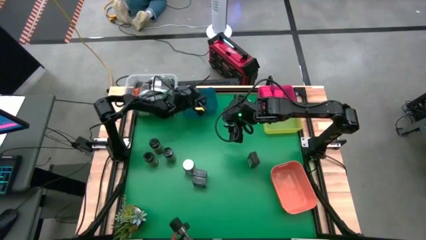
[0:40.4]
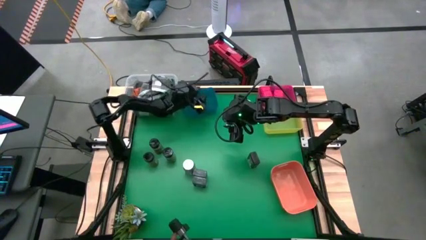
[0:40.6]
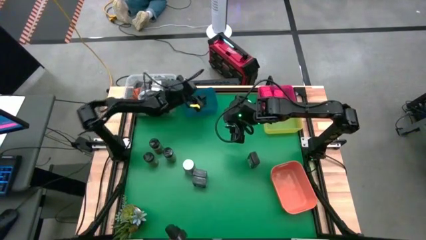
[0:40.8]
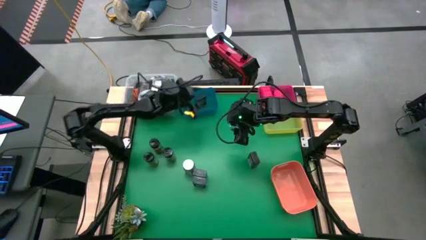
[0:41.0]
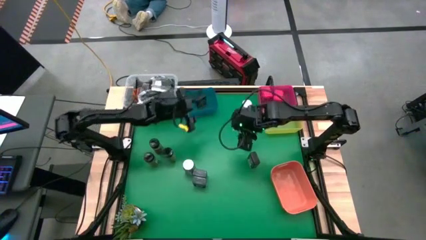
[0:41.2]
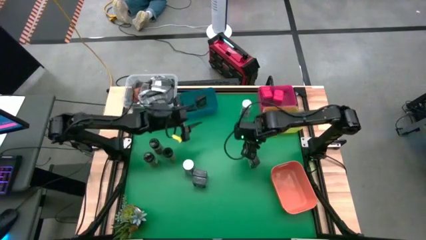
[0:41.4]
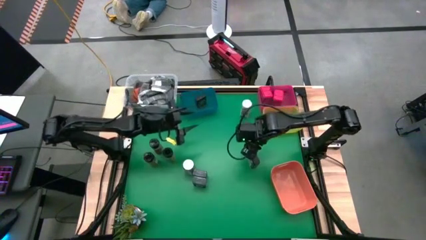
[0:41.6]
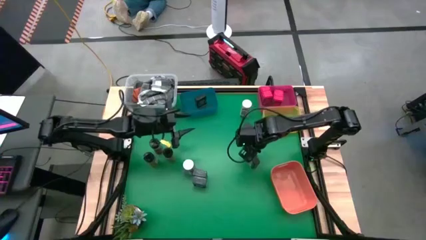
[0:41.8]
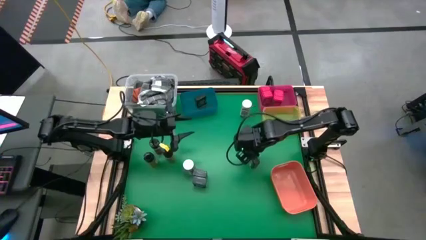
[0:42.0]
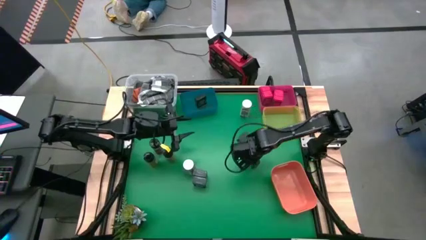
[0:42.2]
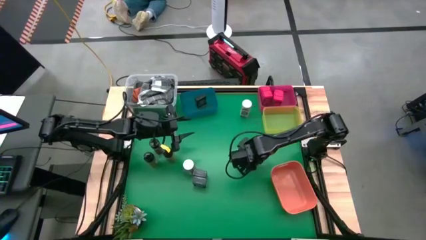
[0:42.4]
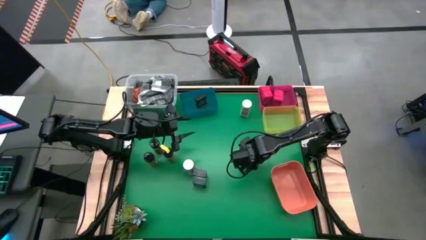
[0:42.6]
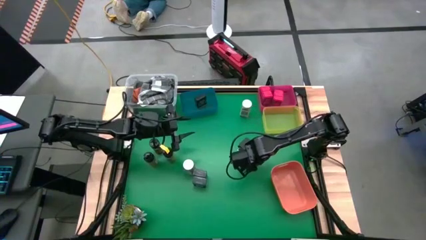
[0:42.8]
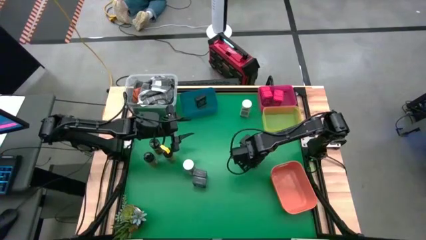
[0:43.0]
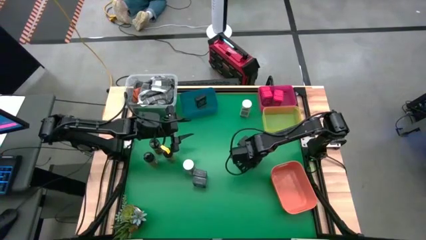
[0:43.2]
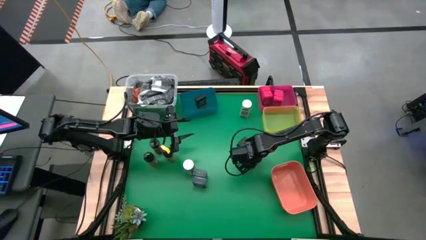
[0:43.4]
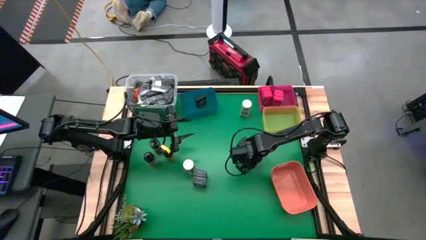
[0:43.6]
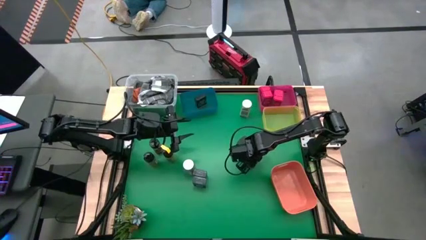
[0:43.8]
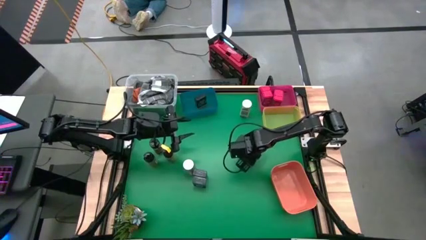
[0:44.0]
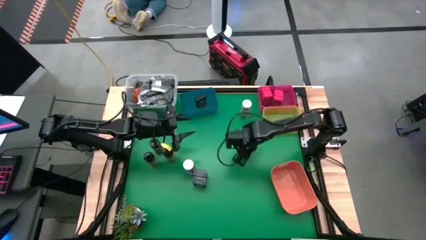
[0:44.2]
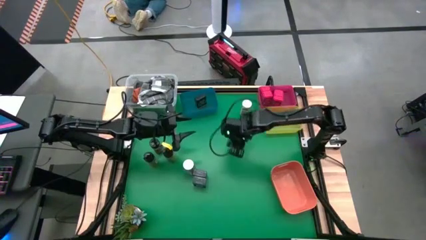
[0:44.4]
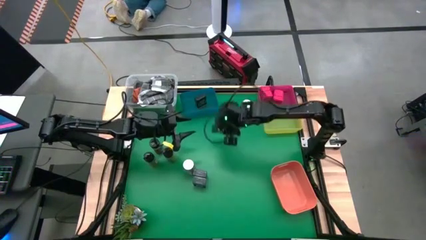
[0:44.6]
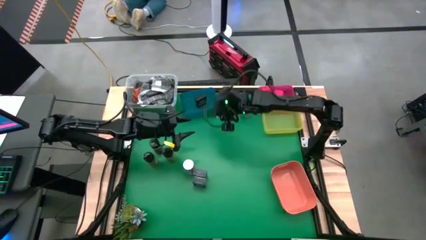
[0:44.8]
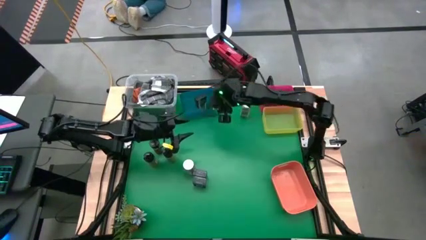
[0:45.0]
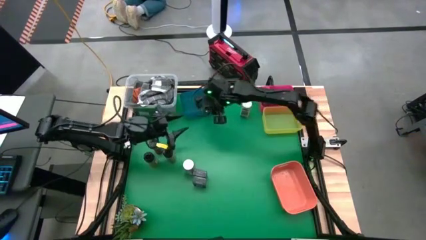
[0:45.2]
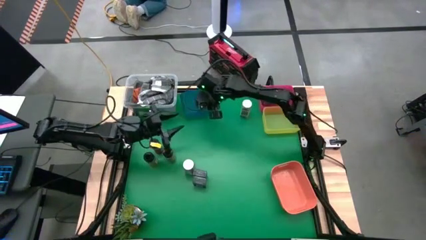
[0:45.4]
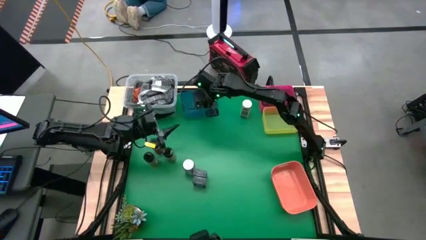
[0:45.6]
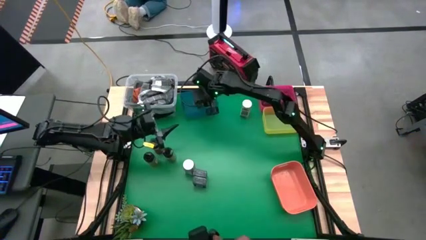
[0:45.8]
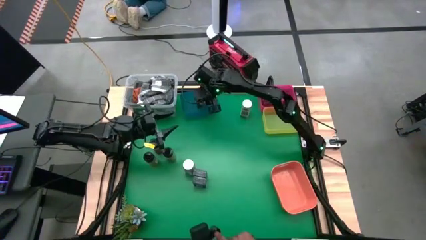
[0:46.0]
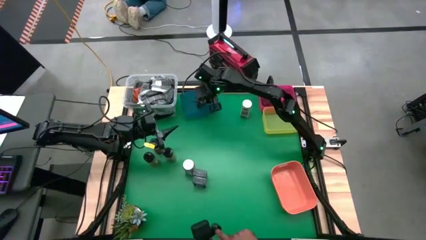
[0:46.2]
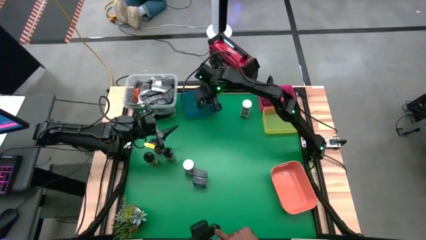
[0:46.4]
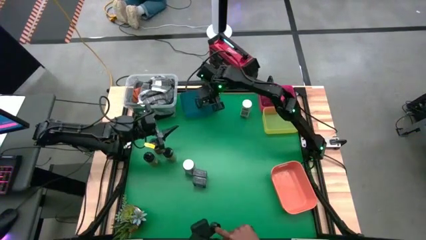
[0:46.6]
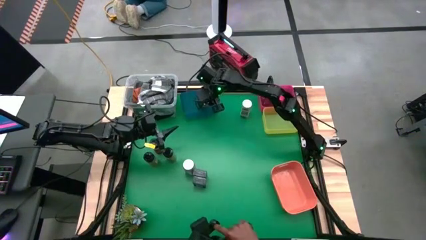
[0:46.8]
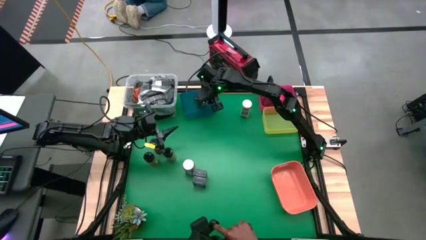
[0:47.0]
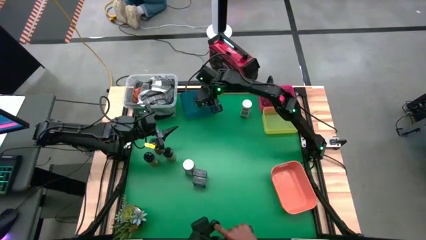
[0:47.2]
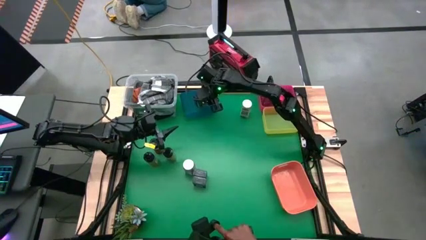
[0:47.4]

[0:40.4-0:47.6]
Task: Sort spices by type
Put the black seasoning from the middle into the blue bin

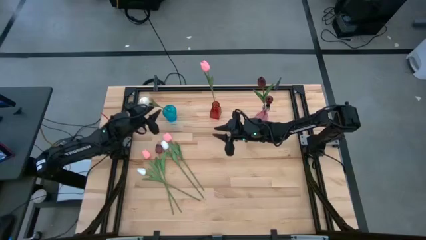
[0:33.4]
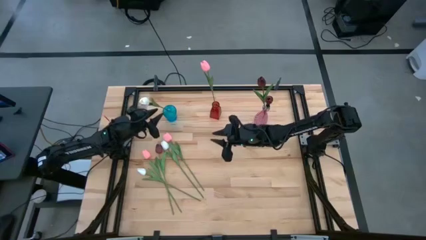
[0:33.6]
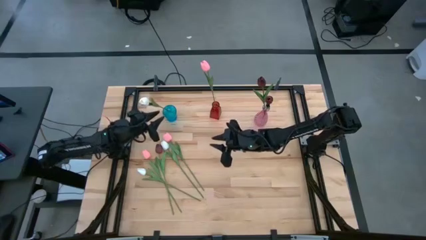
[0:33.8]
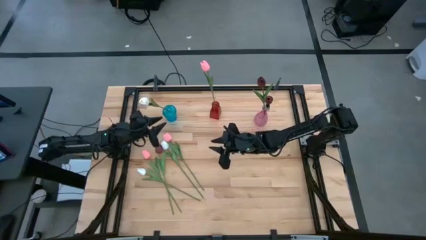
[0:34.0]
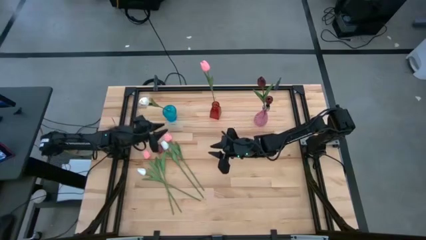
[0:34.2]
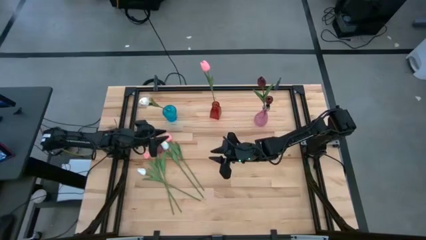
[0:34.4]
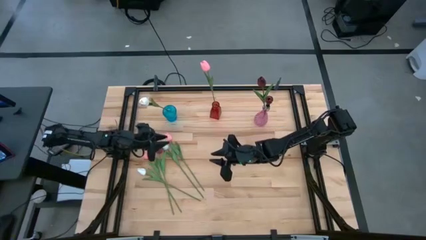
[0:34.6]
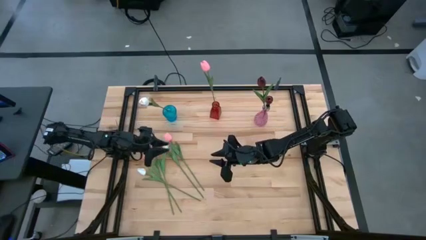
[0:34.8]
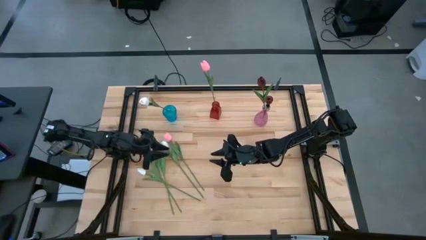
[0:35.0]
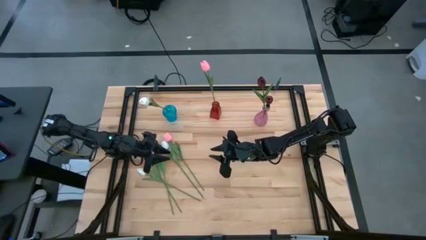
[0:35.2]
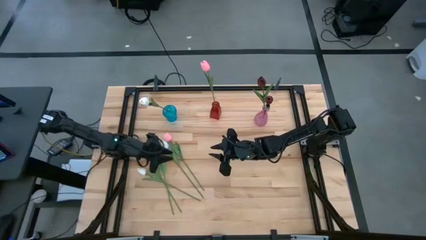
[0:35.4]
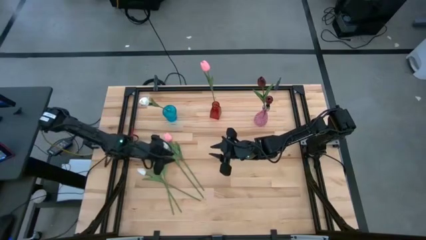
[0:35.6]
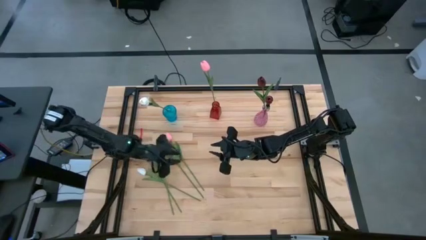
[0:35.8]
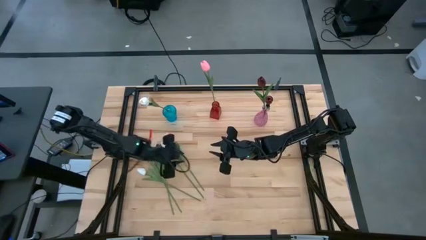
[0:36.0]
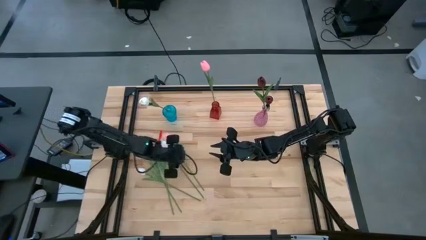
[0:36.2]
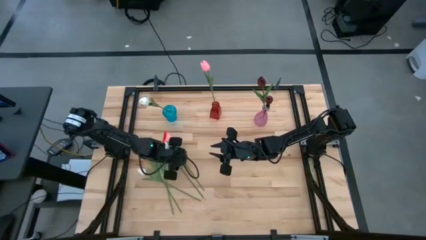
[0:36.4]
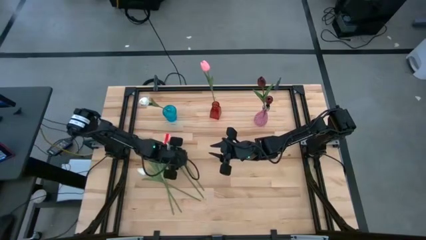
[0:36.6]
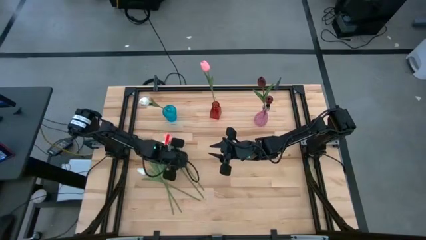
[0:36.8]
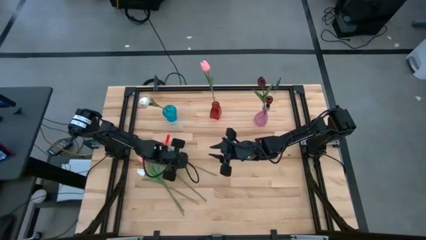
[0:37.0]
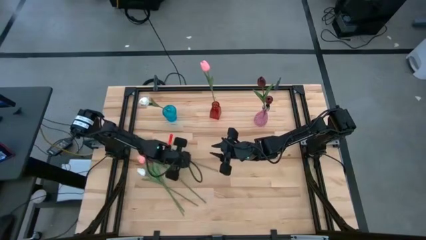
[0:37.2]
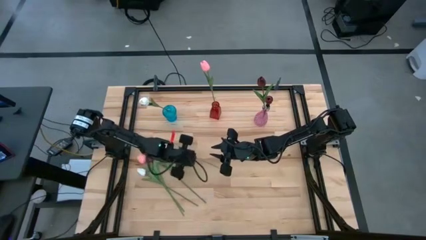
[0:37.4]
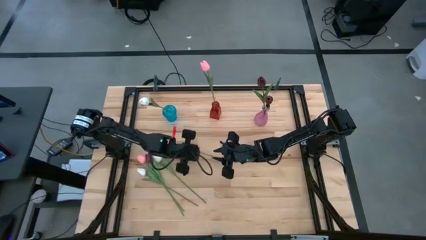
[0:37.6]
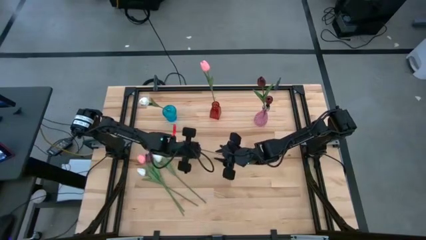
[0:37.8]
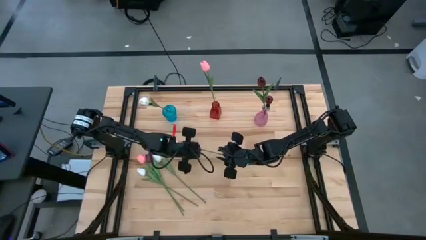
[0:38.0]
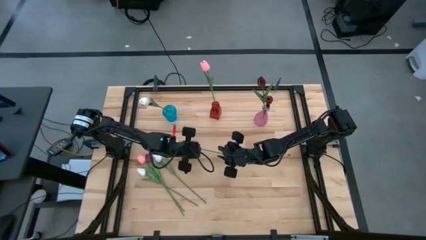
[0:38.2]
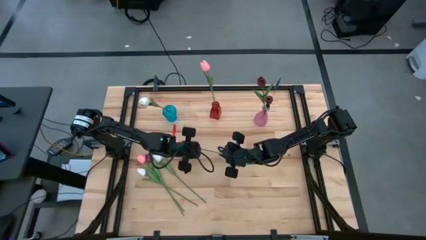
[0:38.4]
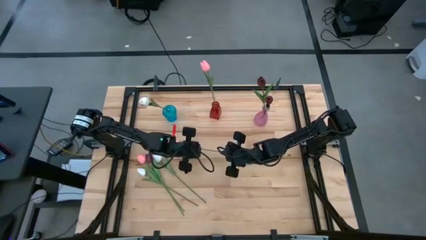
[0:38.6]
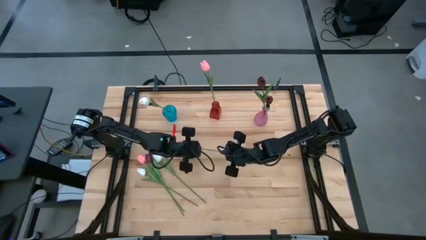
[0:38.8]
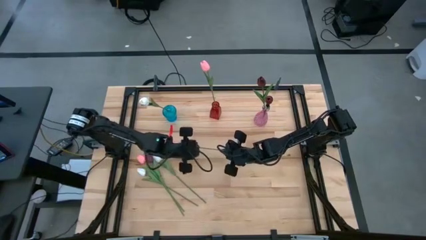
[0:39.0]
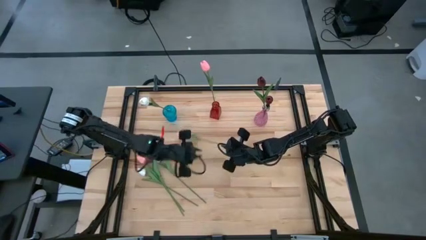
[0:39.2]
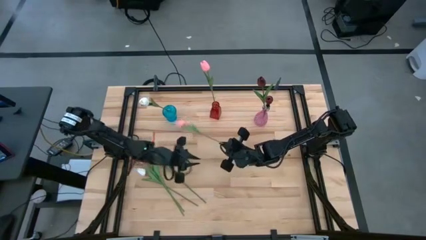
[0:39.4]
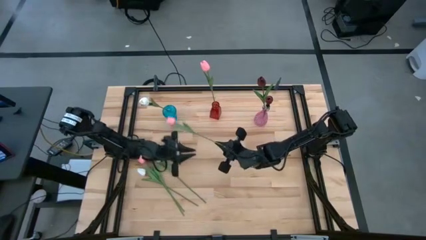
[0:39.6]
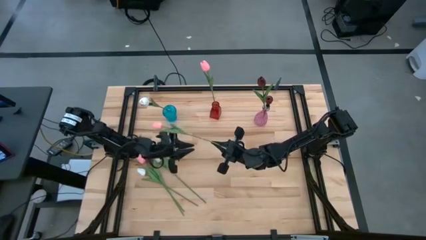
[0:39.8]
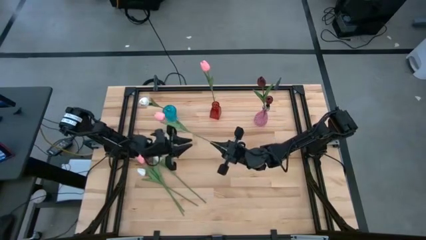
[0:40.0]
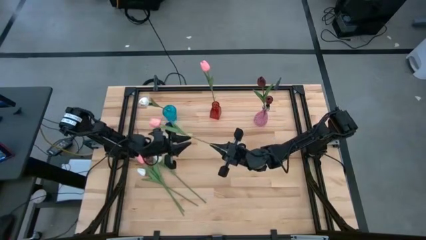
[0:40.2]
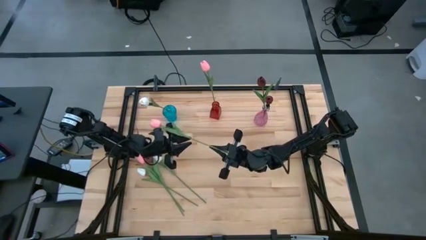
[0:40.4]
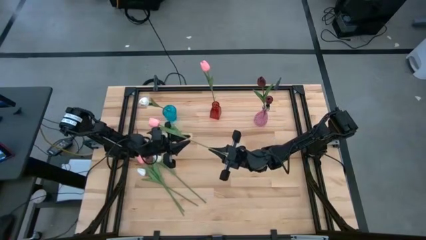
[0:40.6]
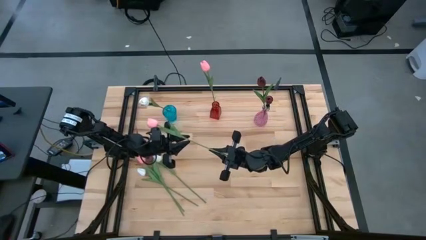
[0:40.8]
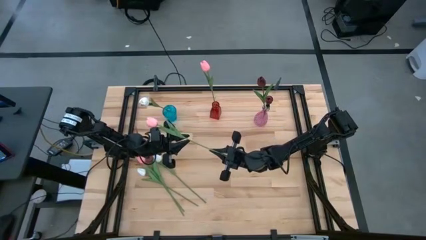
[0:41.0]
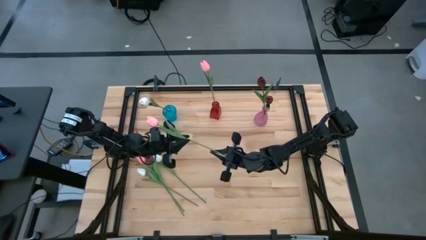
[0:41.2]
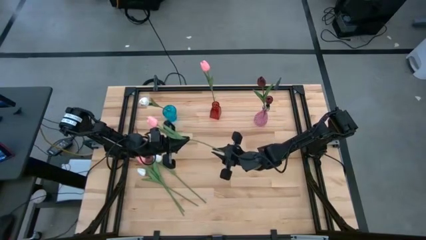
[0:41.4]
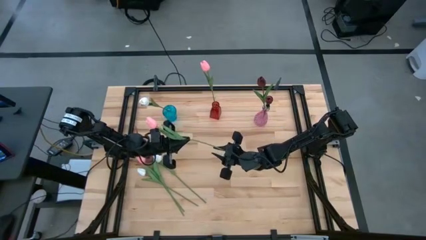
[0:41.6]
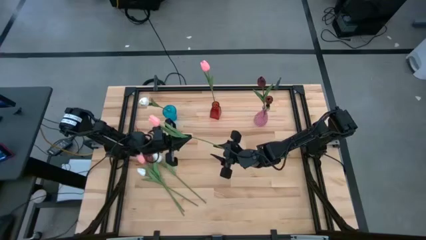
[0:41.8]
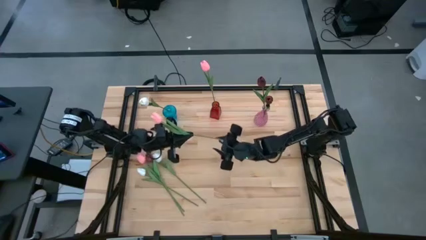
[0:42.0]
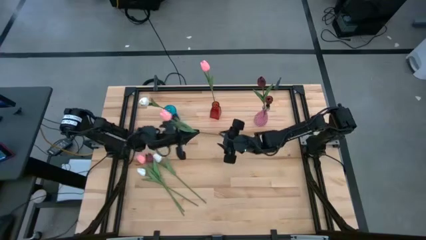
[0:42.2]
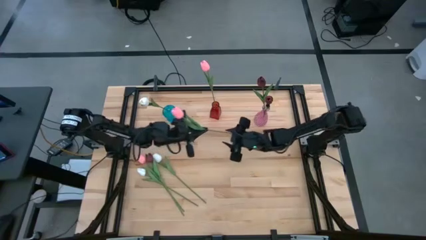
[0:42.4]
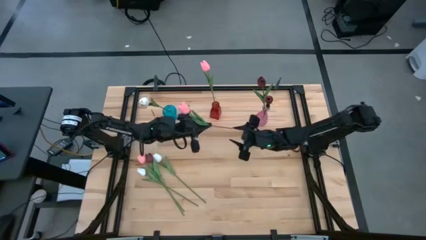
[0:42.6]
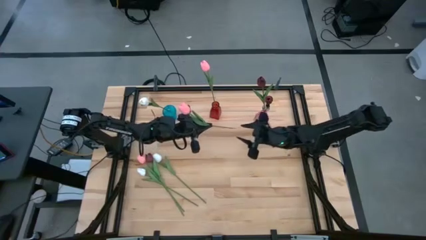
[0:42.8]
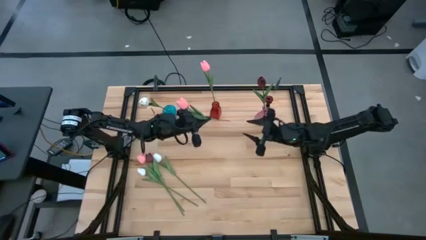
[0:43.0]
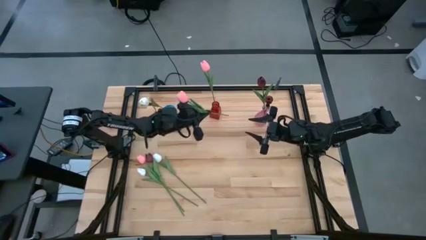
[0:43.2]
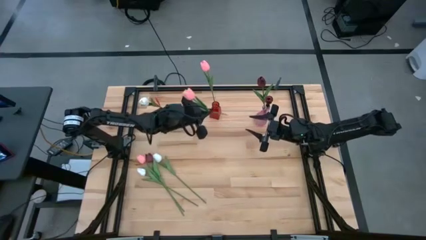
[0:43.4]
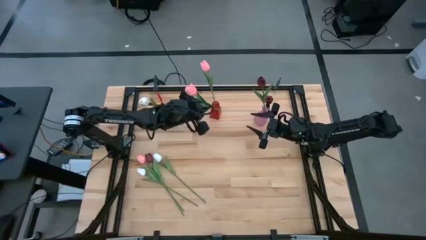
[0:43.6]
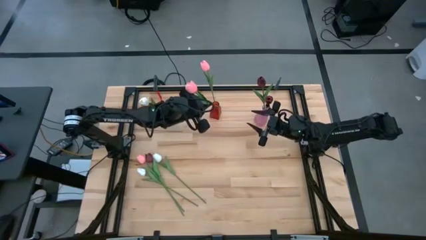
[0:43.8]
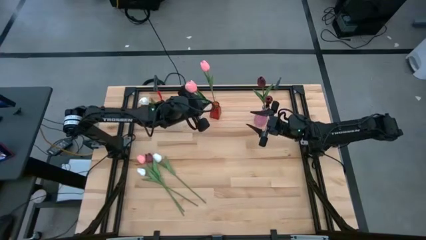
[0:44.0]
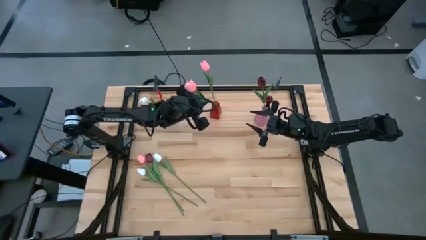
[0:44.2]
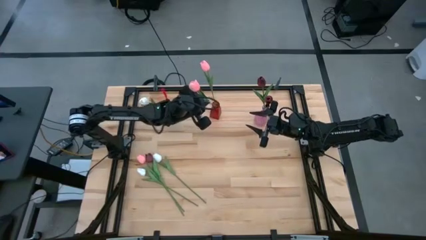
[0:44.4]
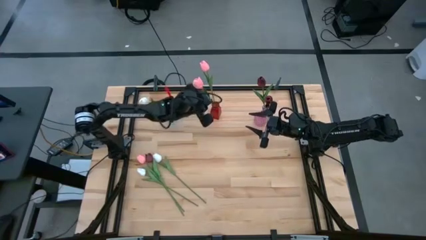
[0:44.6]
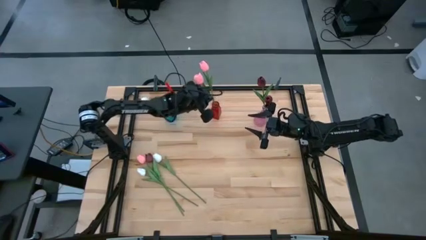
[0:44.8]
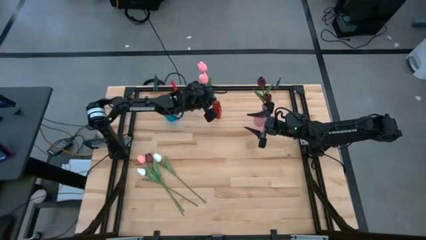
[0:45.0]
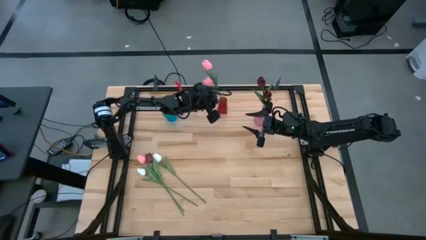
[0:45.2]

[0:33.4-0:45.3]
Task: Sort flowers into vase by color
Put the right pink flower into the red vase
